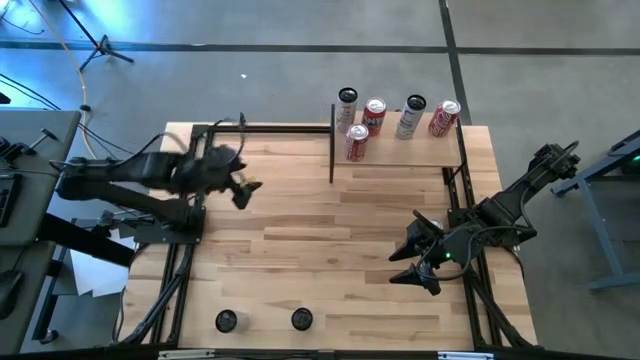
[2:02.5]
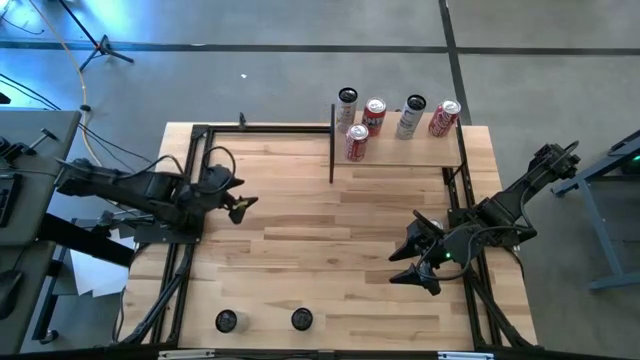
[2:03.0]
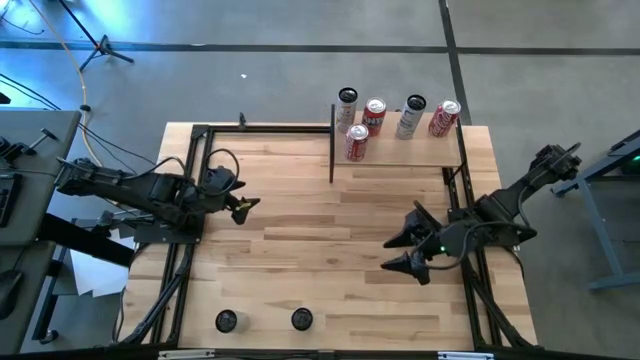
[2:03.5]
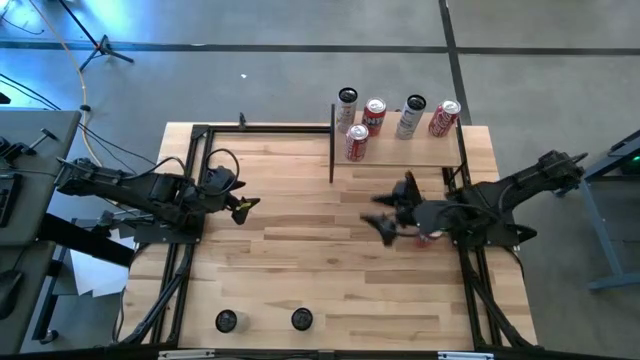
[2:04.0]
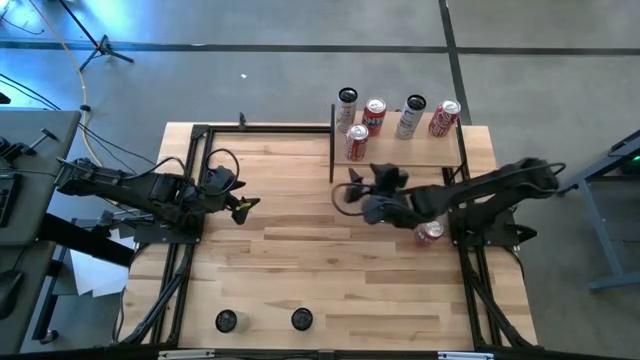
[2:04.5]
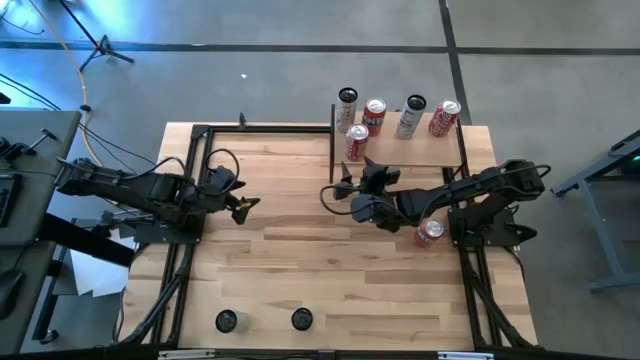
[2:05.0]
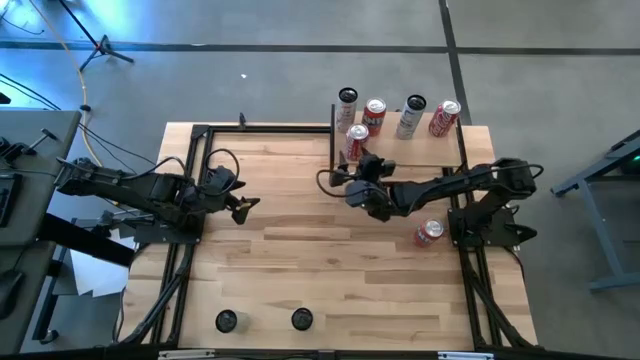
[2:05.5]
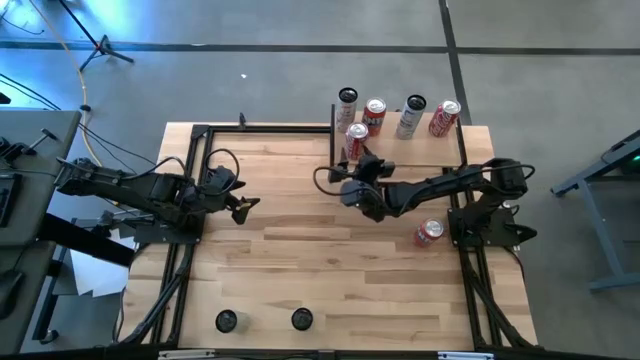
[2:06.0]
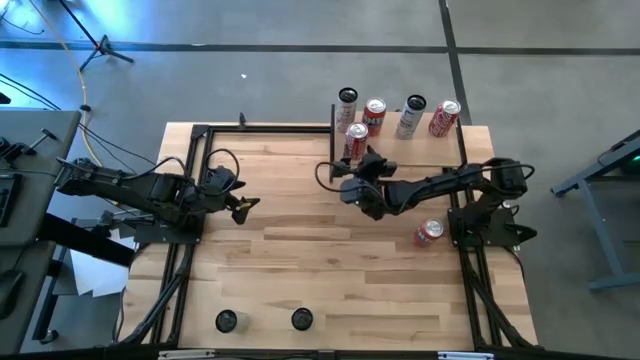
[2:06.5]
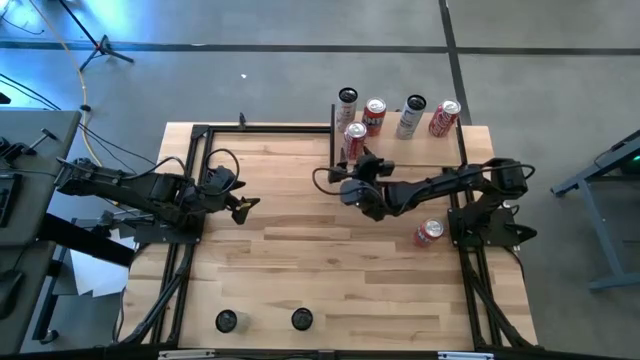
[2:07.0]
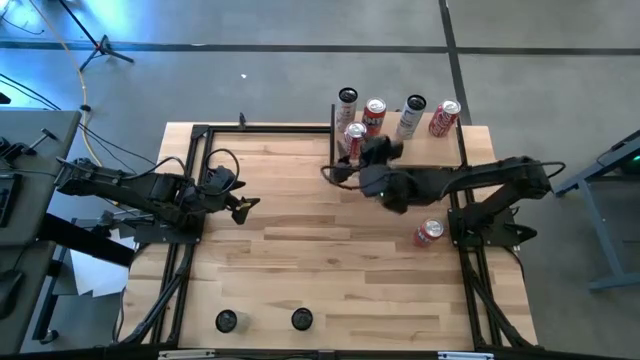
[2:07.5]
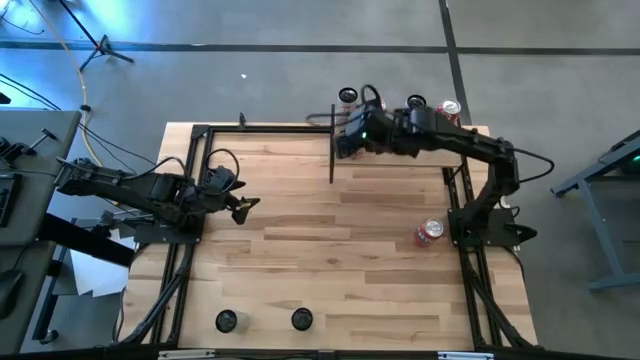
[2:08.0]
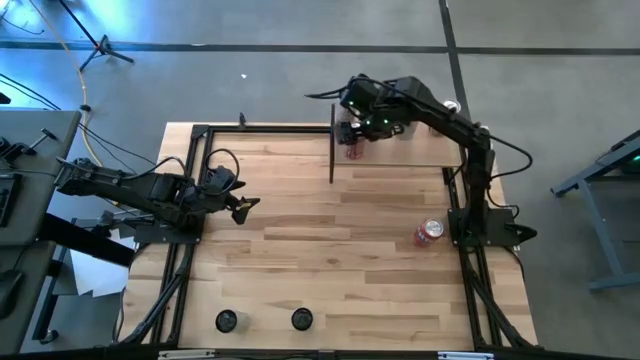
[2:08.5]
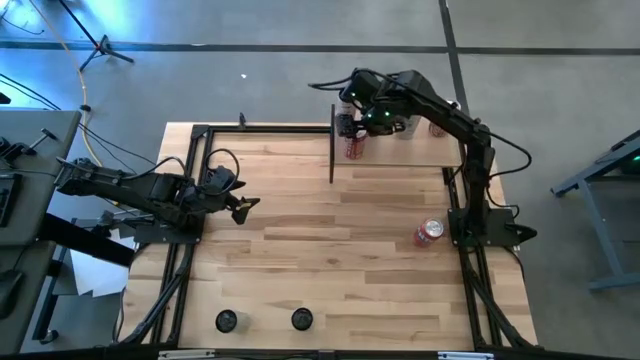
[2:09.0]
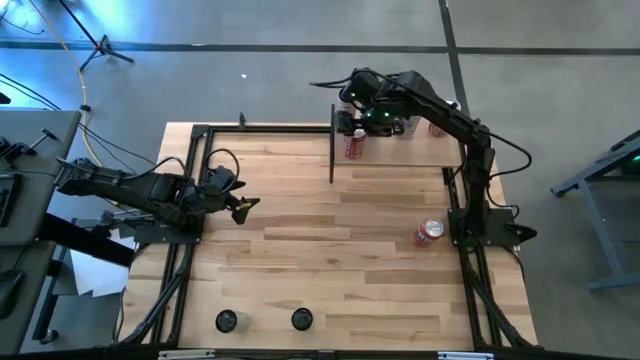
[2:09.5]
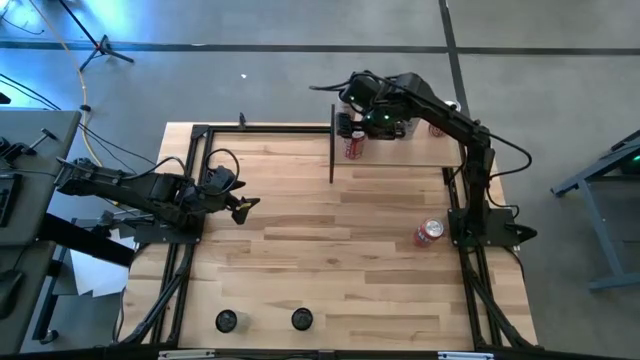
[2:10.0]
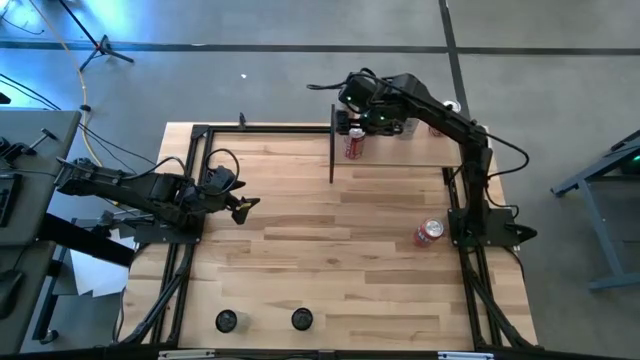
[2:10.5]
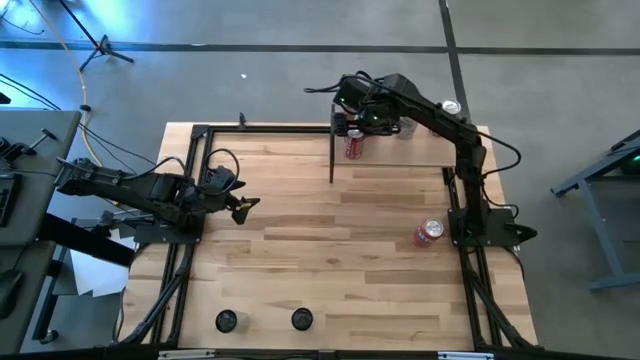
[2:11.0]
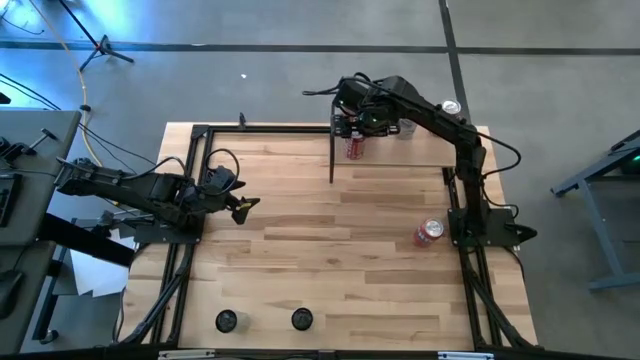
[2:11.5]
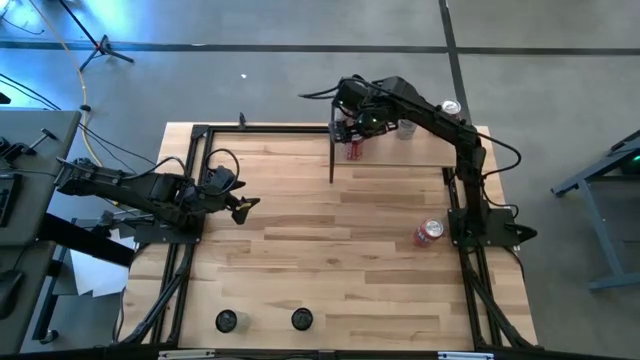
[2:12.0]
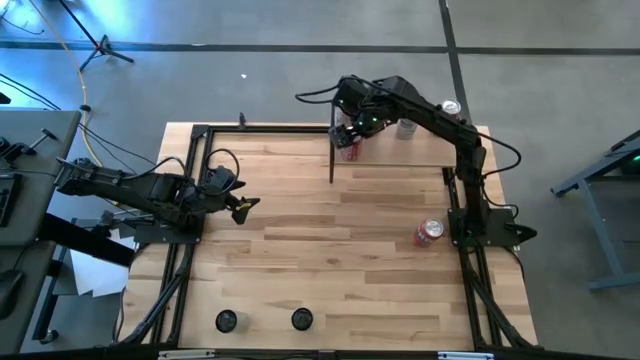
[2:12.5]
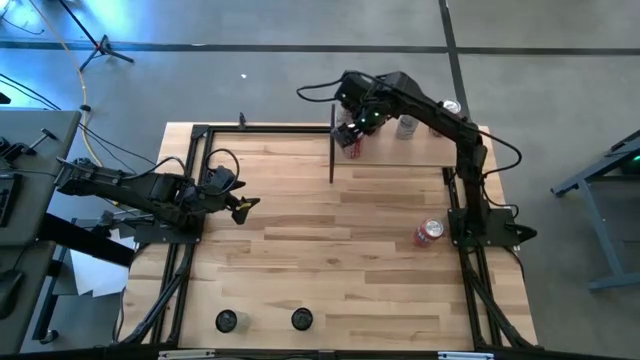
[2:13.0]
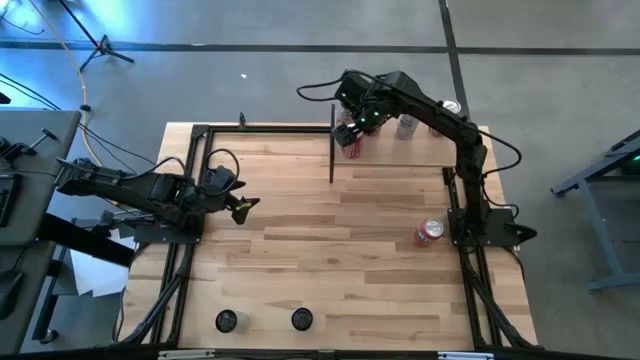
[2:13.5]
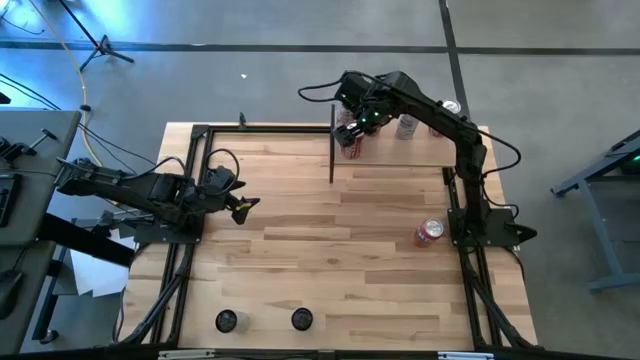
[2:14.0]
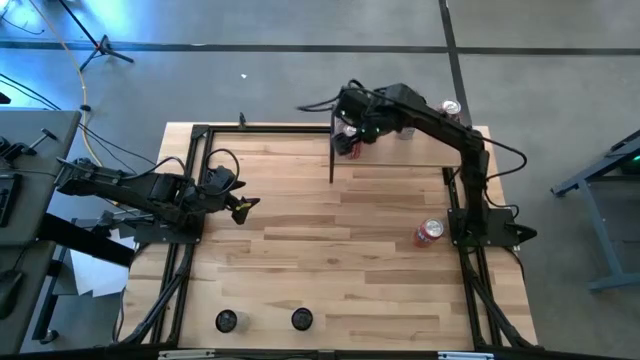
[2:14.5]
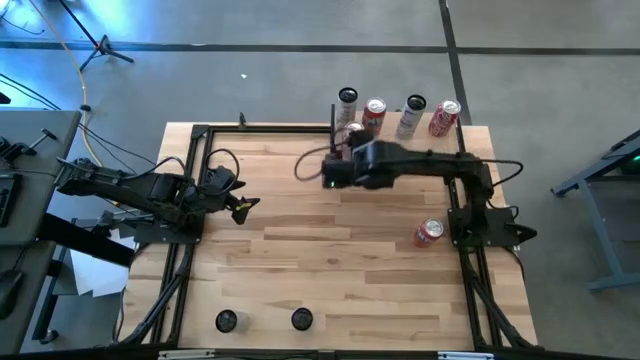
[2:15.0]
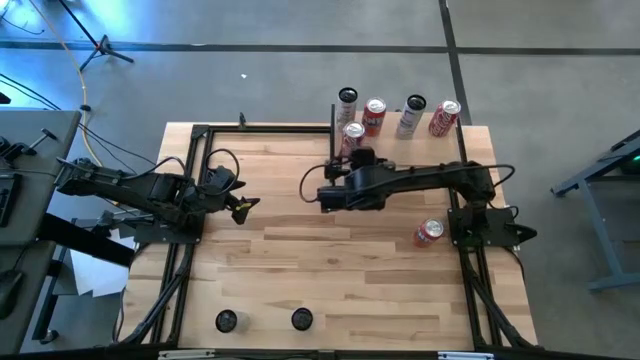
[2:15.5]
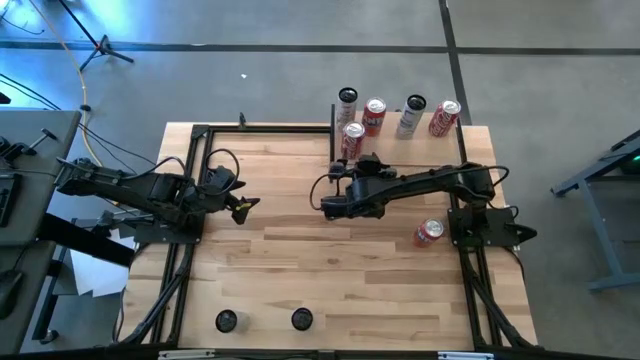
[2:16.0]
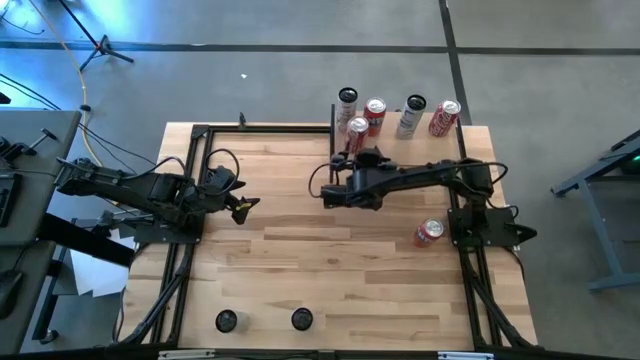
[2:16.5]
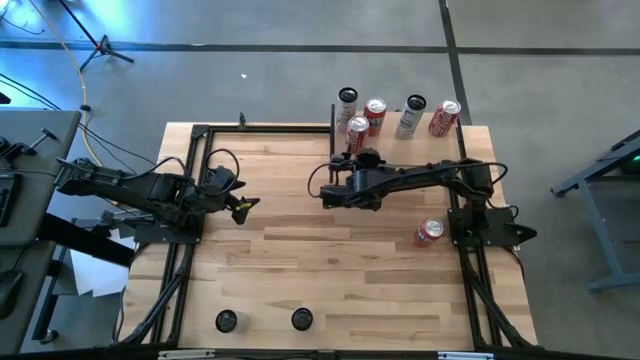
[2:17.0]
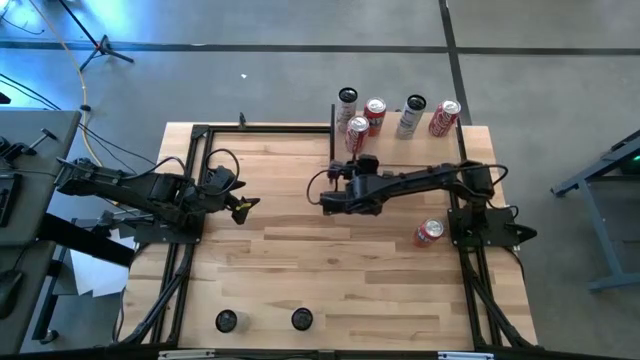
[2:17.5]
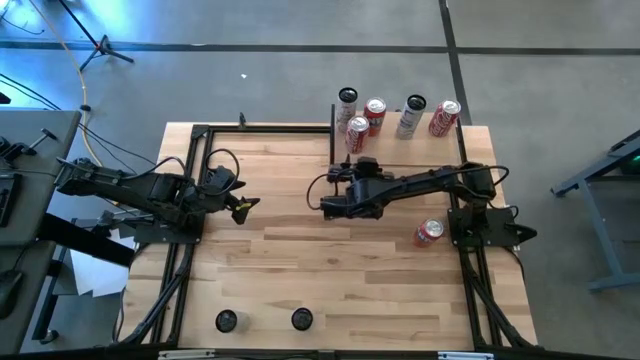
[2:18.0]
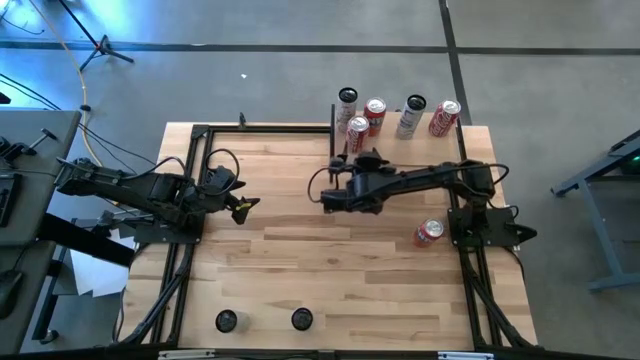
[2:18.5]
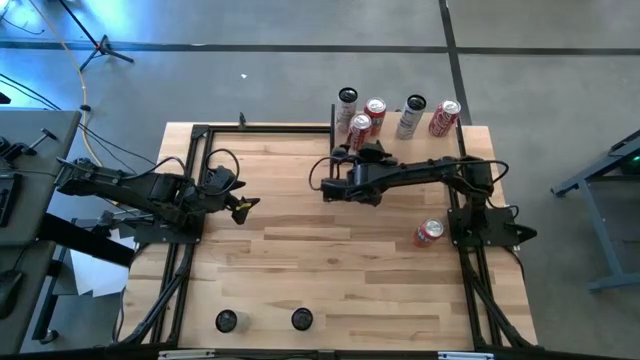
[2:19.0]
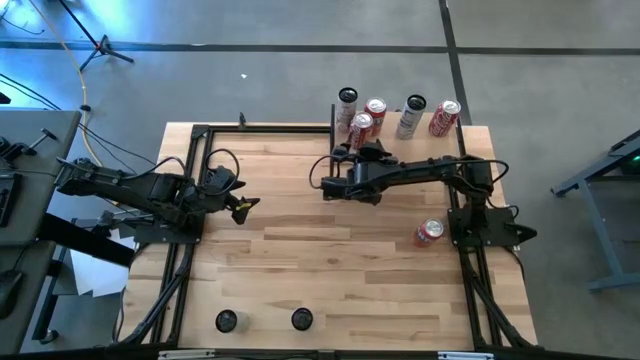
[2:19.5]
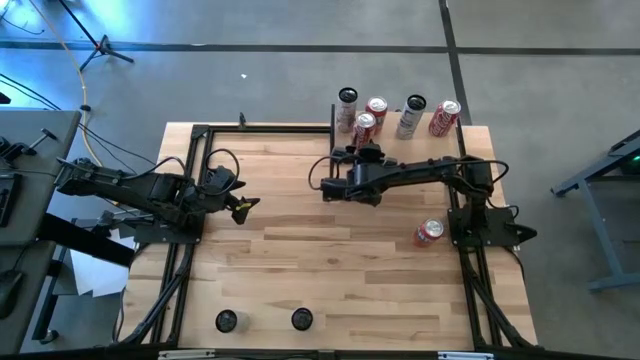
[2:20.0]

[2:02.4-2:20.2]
Task: Place canned beverage on shelf
Put the red white soda can on the shelf aligned with the other red white soda can

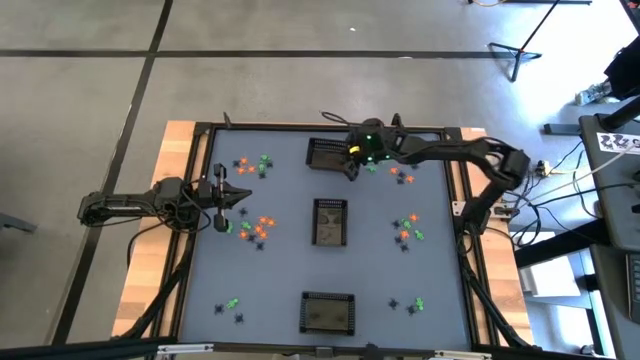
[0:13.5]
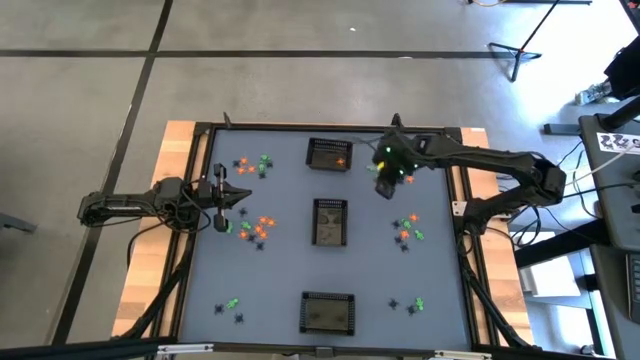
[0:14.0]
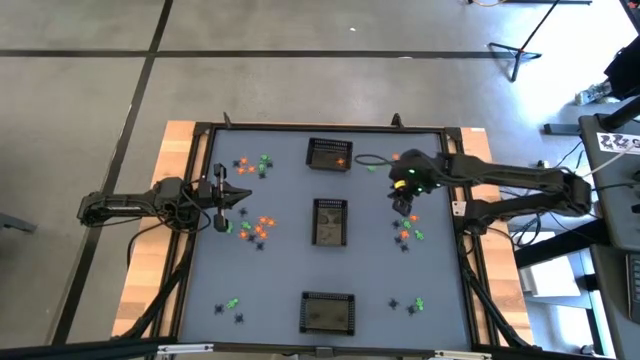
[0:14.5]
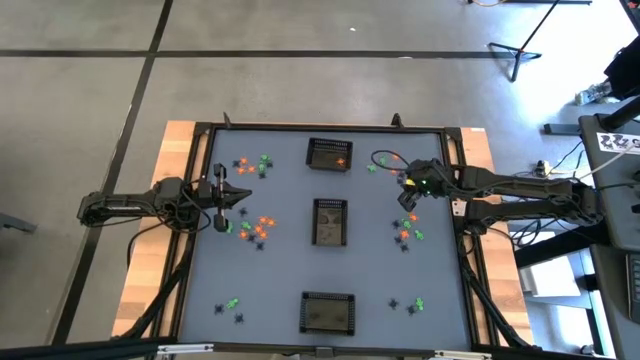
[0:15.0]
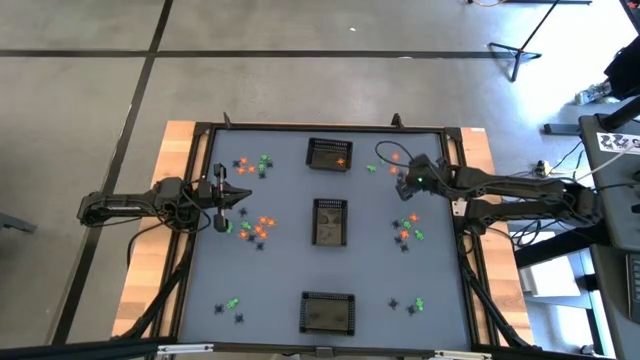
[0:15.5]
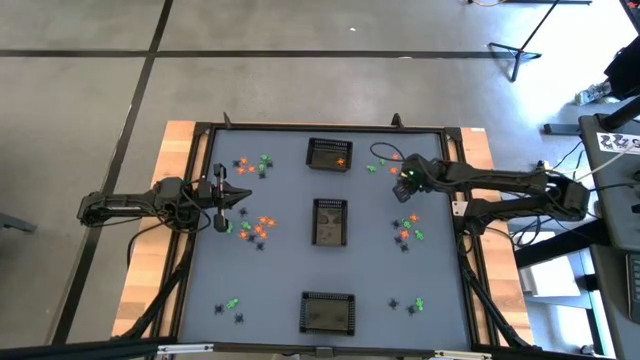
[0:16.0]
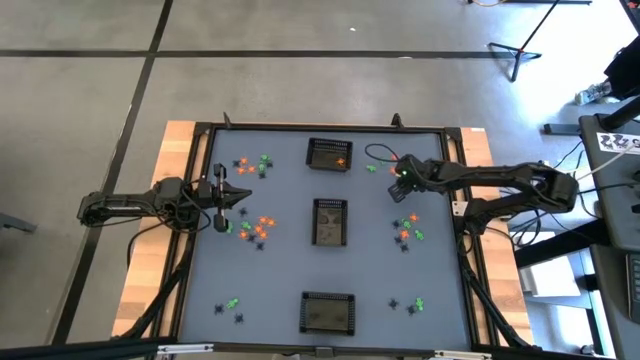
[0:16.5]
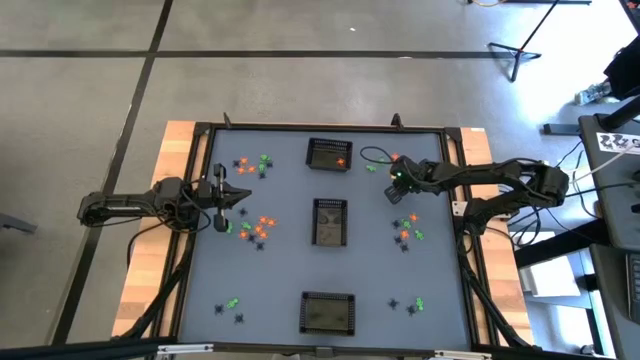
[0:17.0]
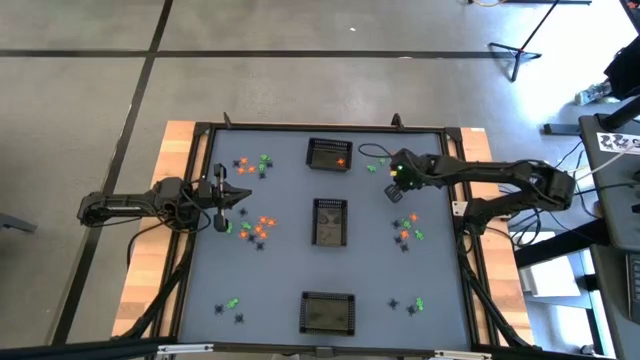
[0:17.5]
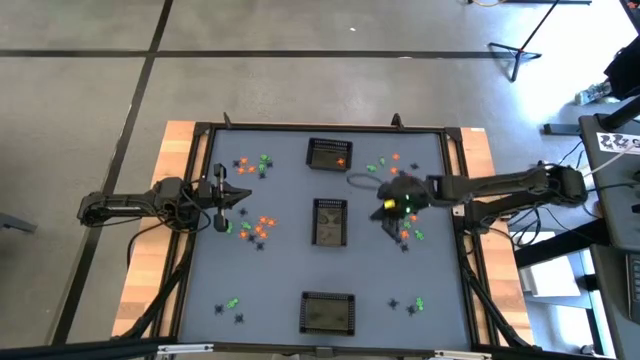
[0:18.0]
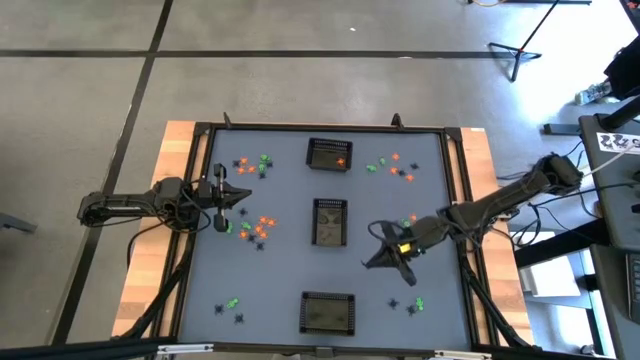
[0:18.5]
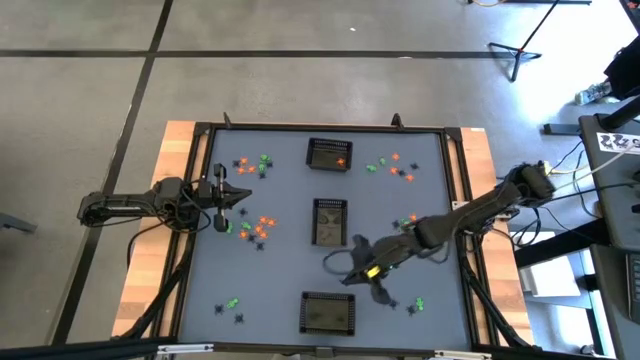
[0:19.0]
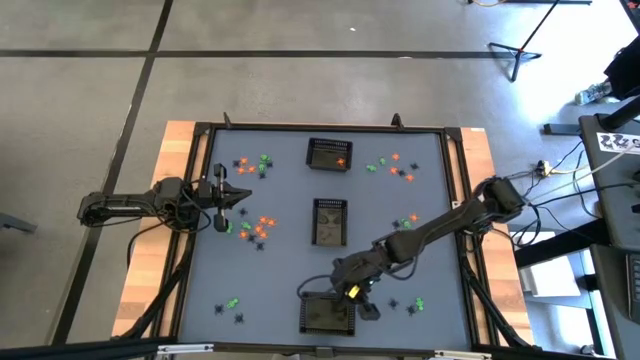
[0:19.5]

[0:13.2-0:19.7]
Task: Sort Halloween decoration
Put the black spider toy into the bottom black bin
